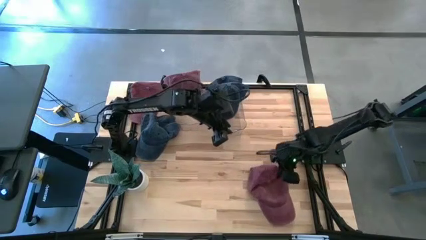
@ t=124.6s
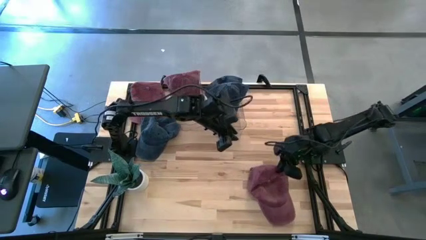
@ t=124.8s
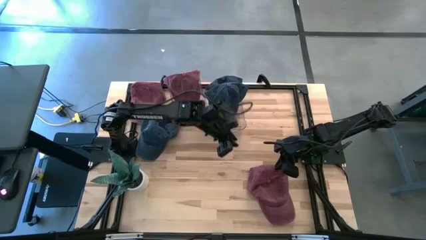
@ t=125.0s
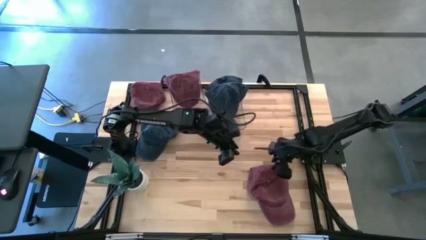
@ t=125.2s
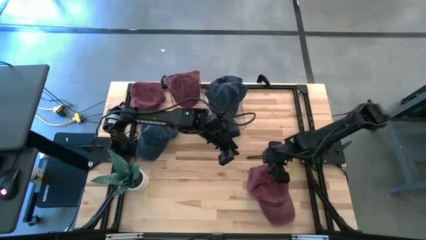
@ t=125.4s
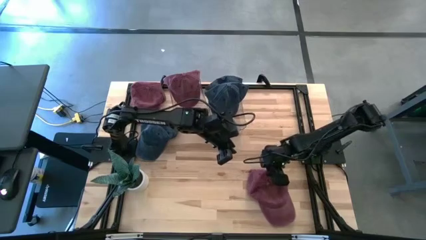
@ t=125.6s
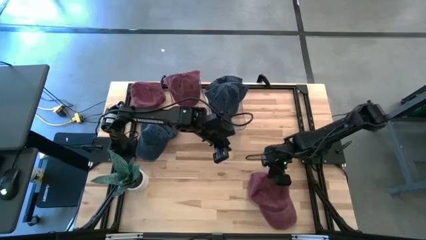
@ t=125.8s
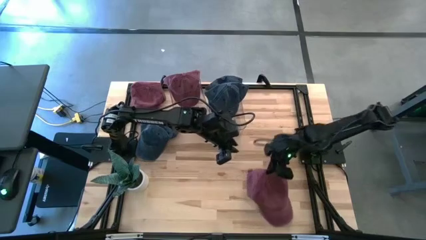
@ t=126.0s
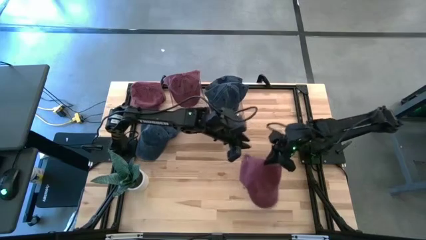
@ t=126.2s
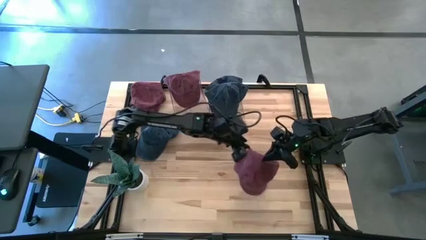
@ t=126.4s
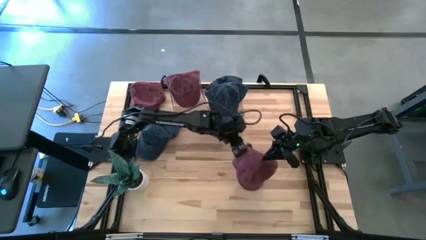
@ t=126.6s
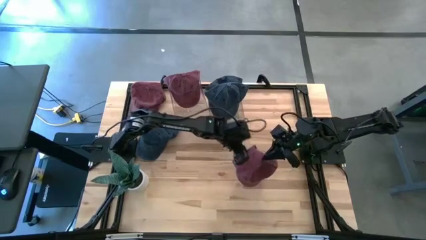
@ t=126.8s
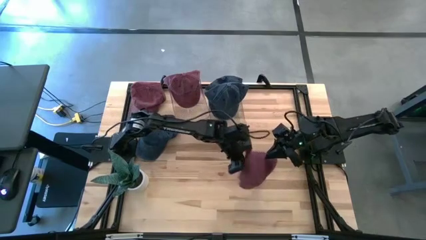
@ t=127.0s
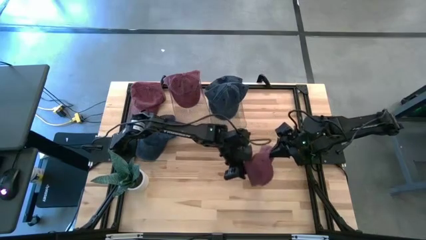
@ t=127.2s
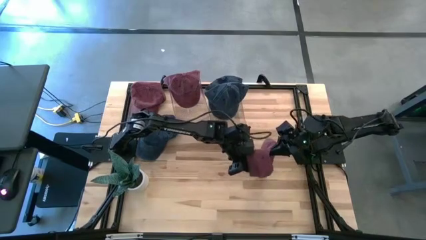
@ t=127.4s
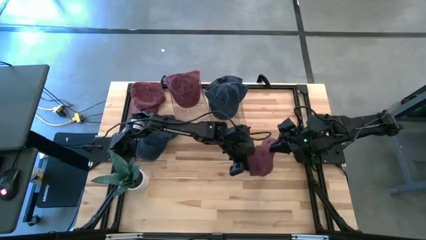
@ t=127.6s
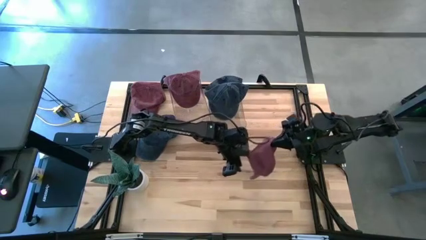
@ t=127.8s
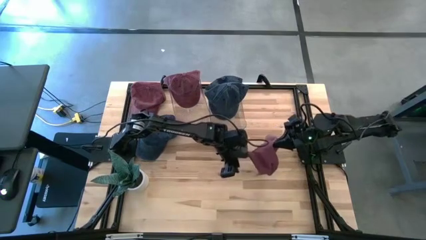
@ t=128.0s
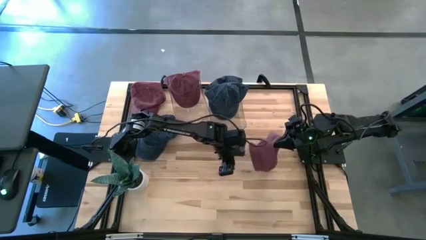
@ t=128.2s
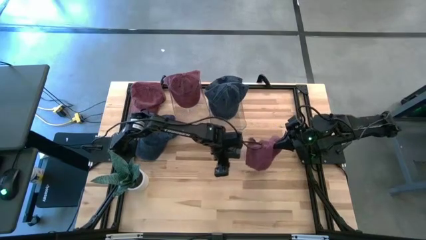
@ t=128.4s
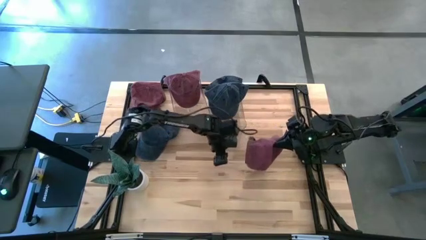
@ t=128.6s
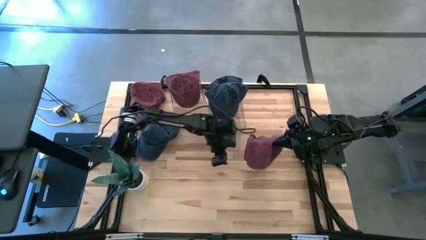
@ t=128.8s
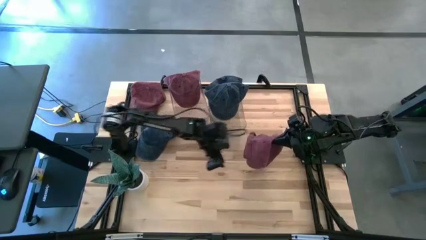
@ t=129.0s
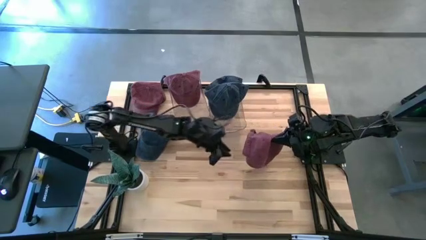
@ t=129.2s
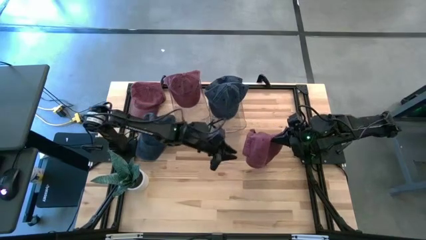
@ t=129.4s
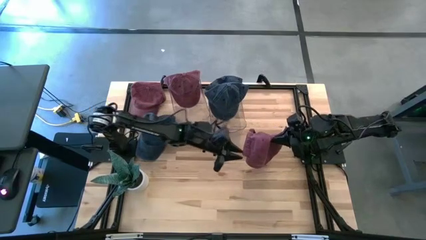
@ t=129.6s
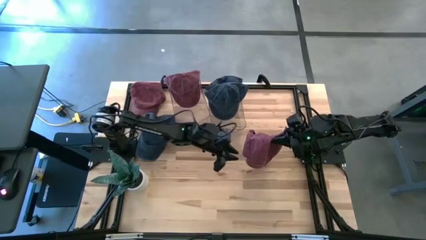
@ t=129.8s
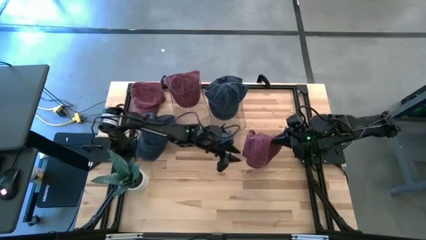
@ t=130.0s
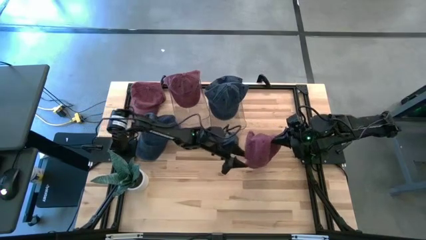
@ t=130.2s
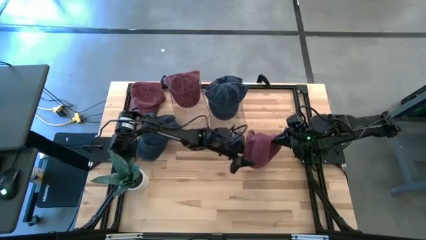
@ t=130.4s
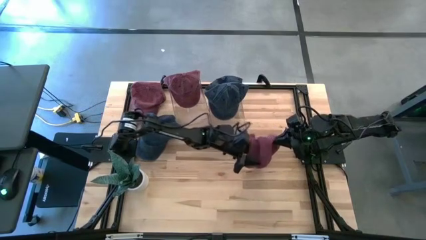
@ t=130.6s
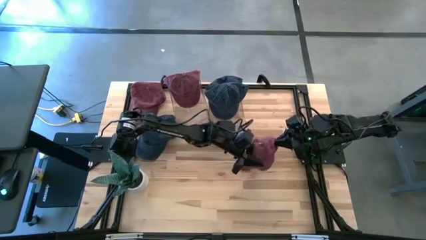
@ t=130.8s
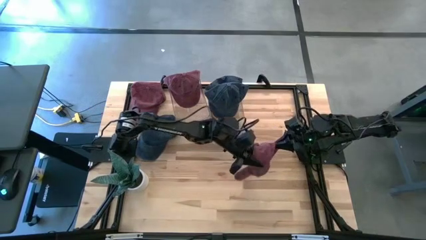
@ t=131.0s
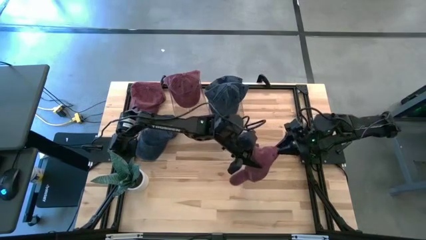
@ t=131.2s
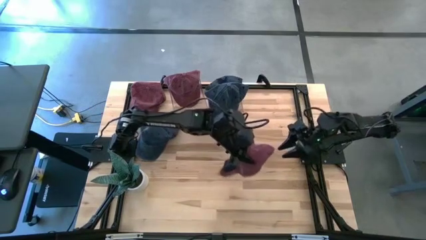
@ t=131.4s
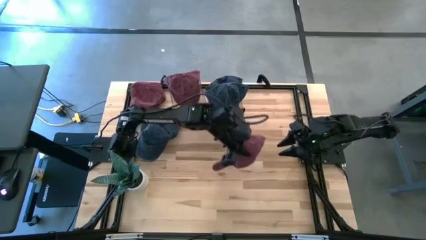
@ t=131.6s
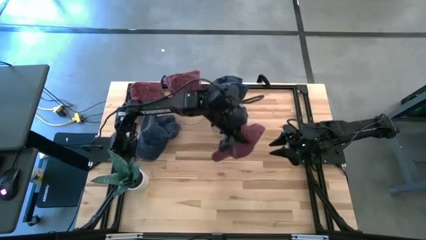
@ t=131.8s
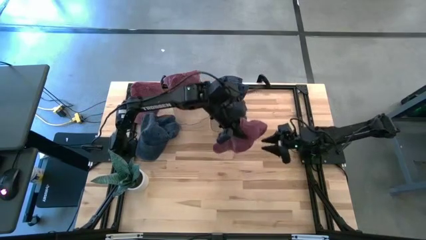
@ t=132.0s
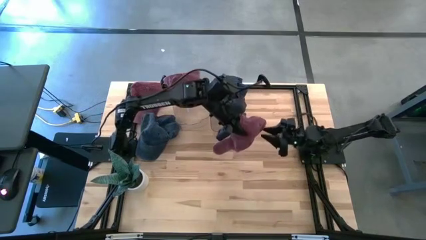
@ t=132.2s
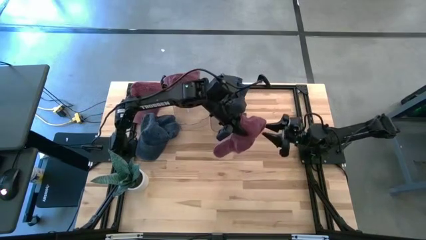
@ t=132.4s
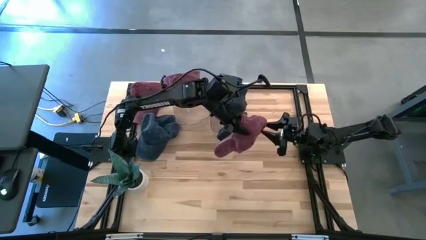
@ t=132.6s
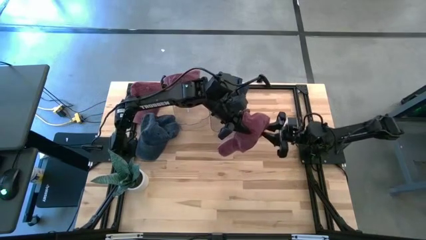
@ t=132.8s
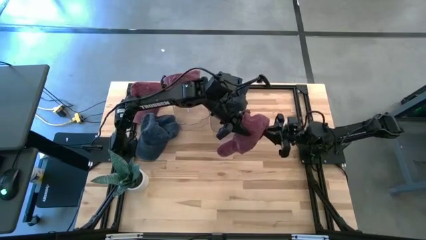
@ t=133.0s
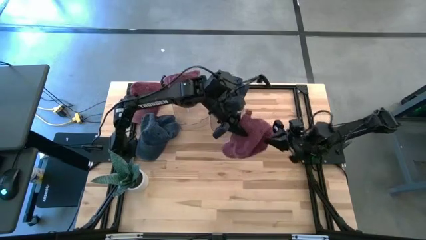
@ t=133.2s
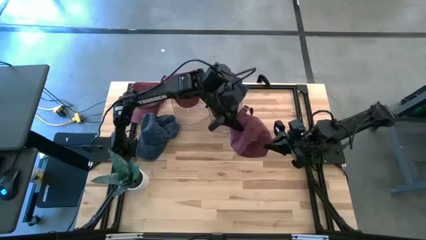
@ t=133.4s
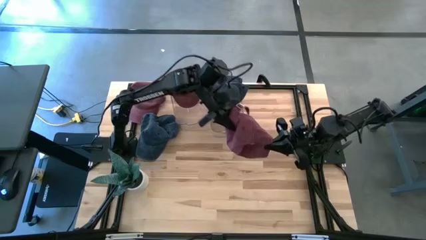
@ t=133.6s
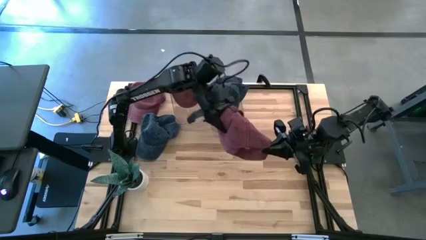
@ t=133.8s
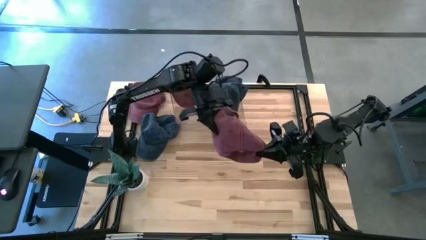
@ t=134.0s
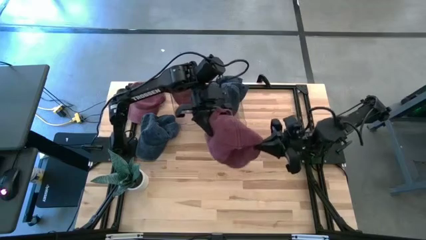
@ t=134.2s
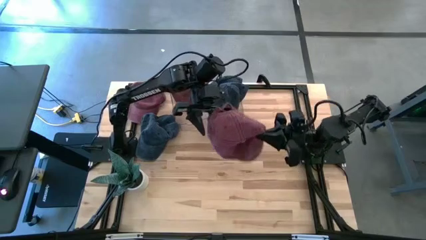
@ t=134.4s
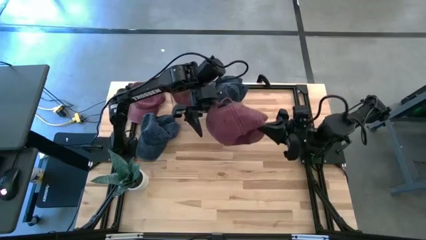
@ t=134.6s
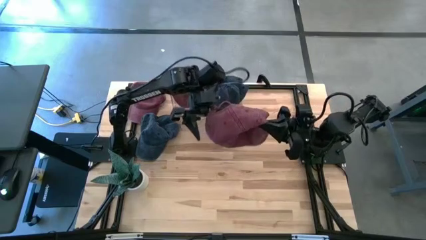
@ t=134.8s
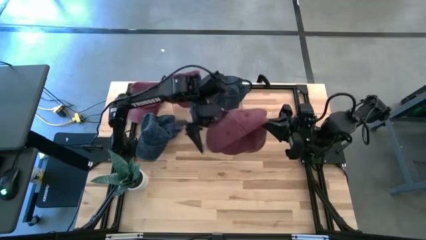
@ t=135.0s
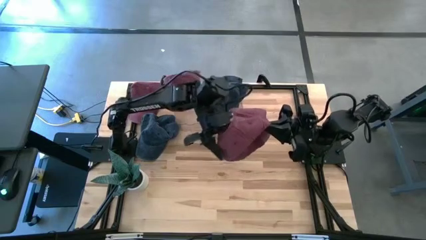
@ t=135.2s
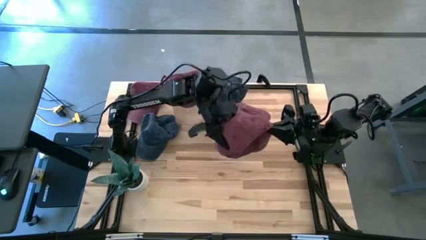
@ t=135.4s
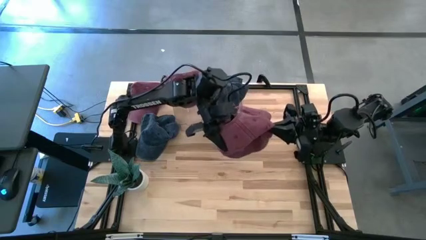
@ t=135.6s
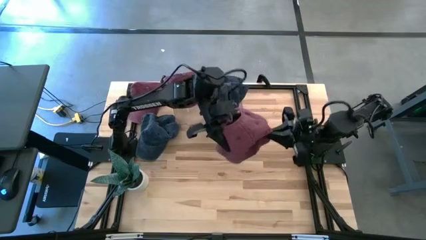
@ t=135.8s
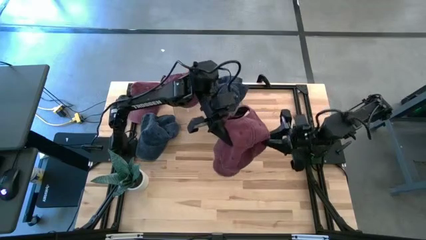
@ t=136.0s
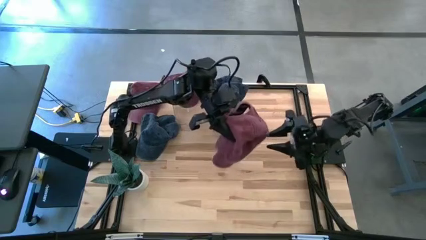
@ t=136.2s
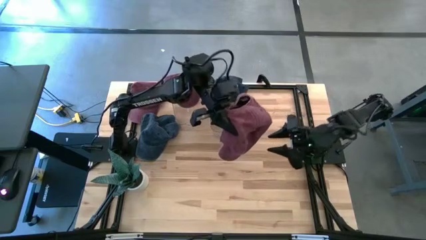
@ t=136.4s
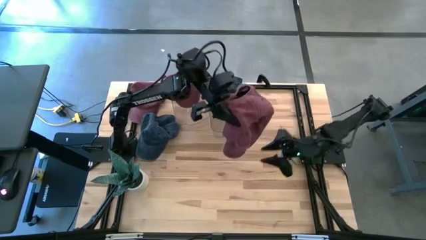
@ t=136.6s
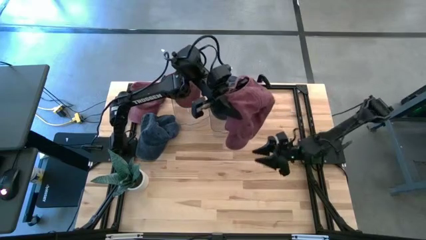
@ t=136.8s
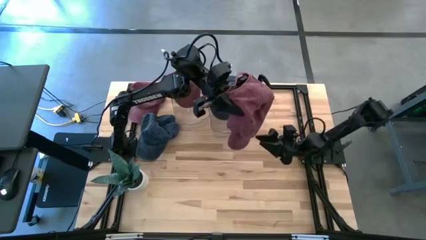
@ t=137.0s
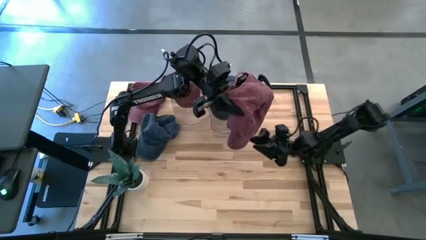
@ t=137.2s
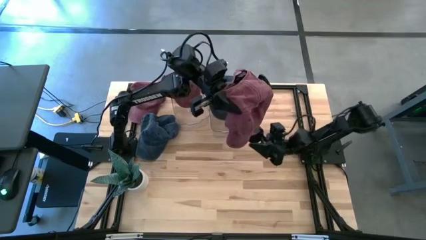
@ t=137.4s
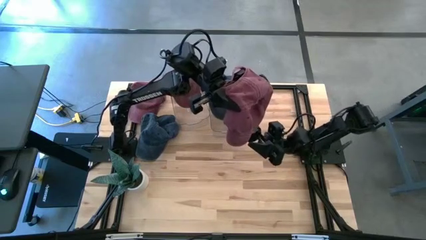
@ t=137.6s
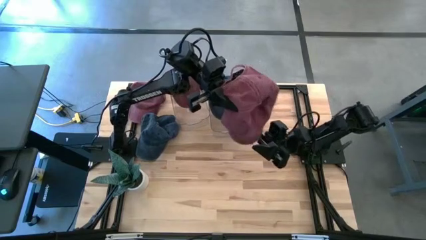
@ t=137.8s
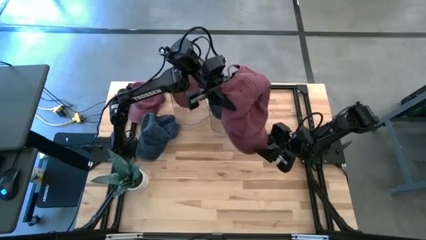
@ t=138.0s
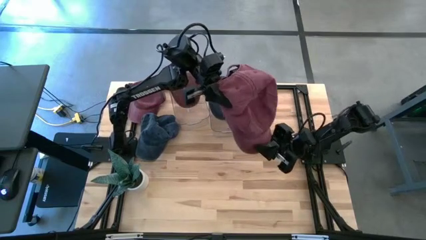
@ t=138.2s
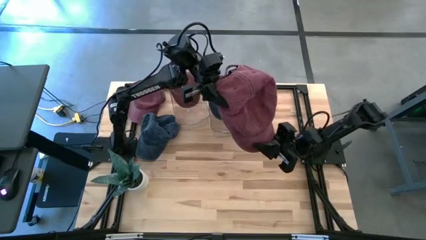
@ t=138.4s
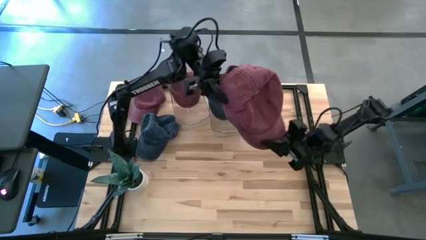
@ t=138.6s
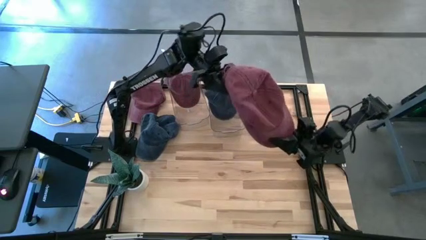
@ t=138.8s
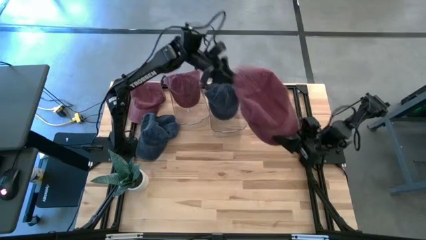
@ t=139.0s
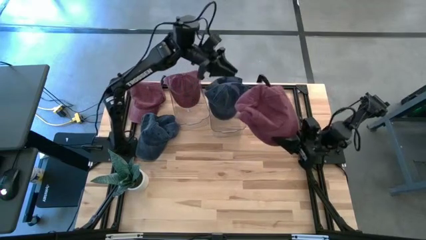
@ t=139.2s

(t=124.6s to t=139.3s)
Task: Pick & Place hat
Put the bottom red cap into the left bin
